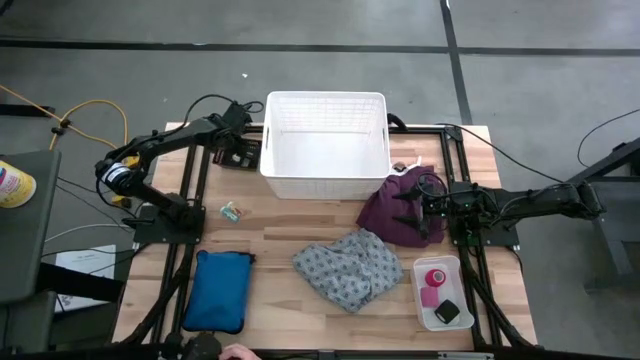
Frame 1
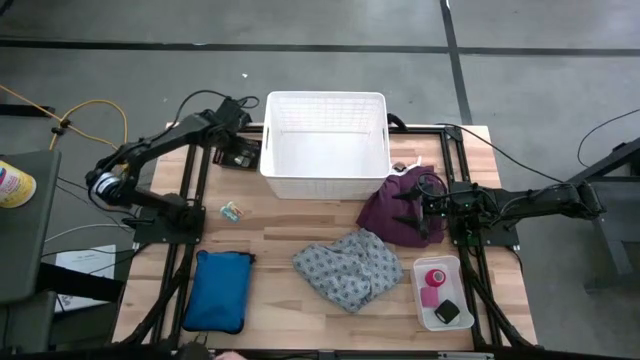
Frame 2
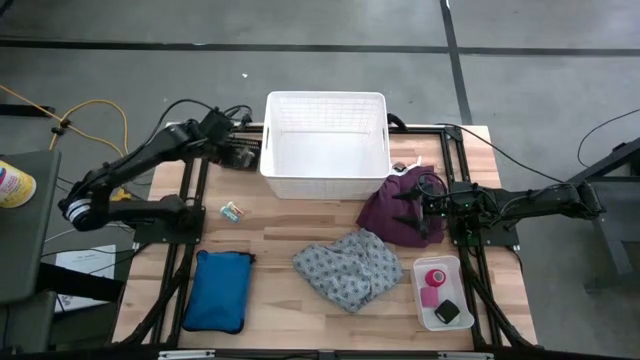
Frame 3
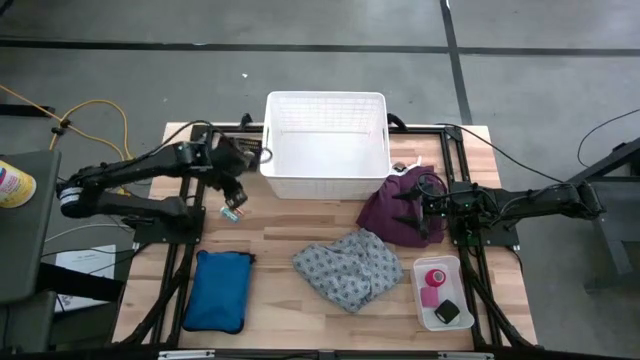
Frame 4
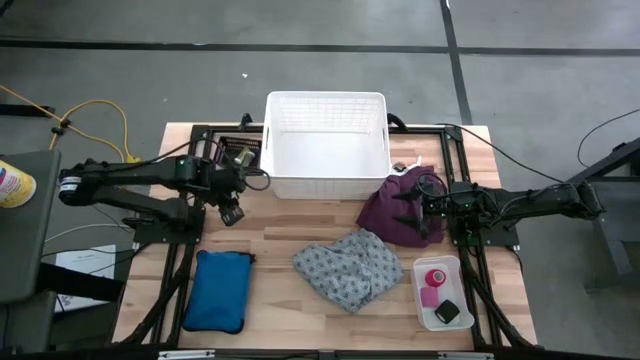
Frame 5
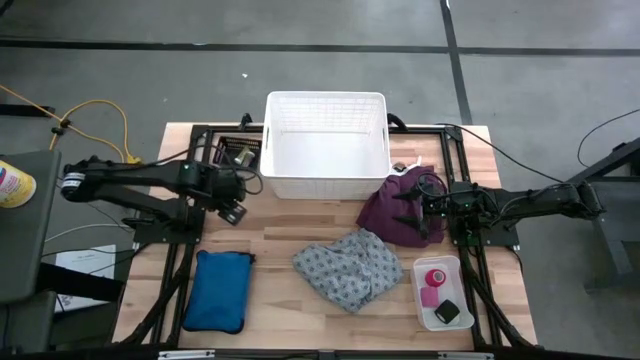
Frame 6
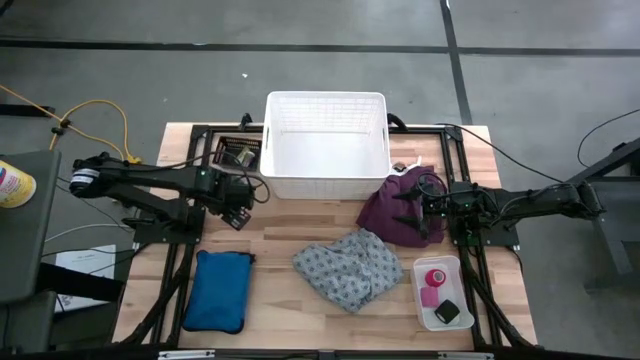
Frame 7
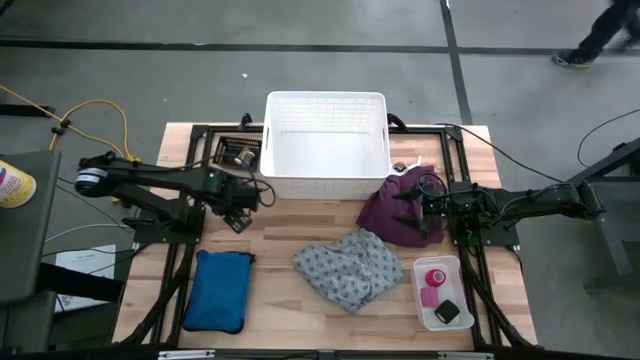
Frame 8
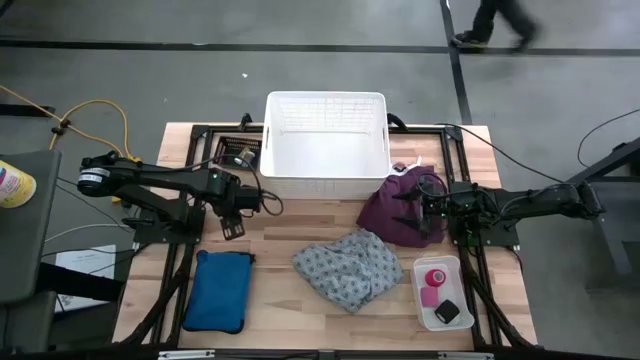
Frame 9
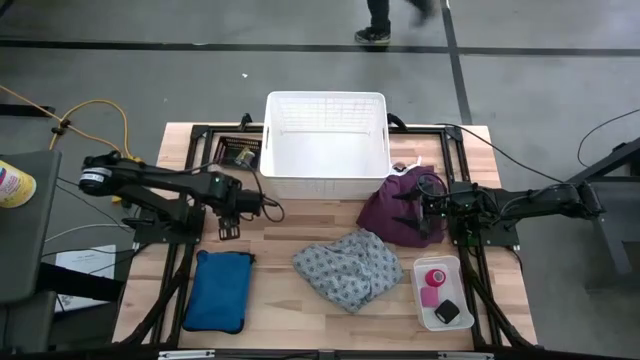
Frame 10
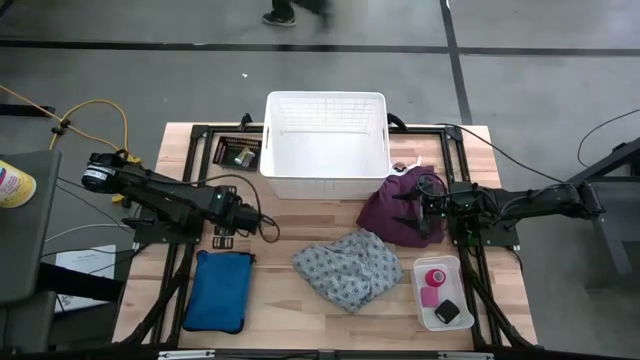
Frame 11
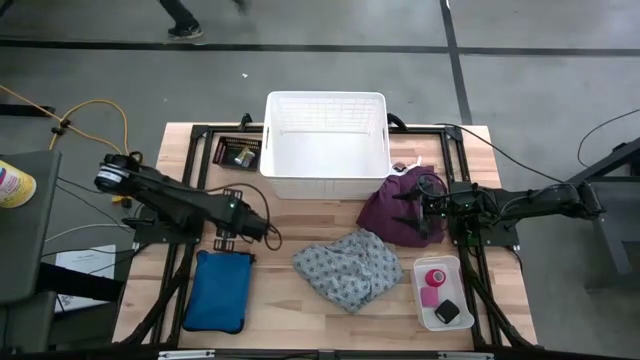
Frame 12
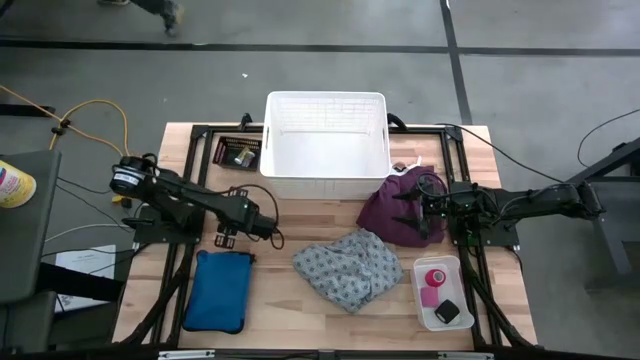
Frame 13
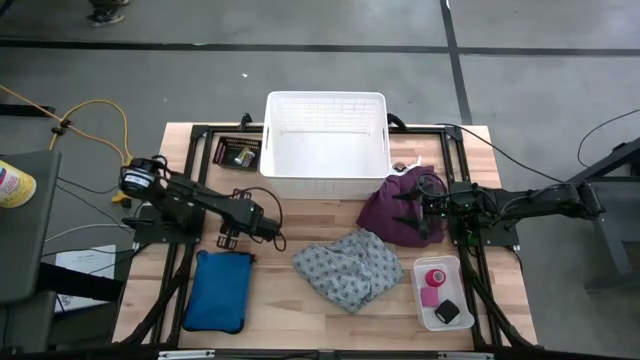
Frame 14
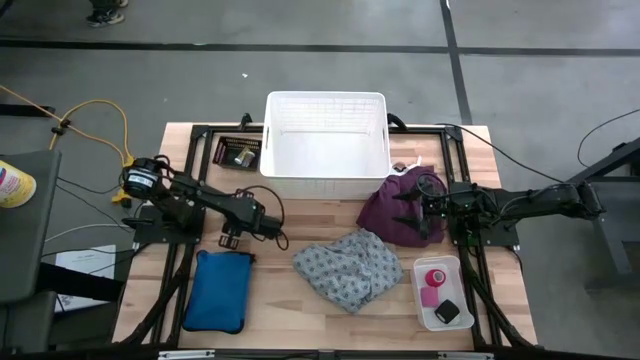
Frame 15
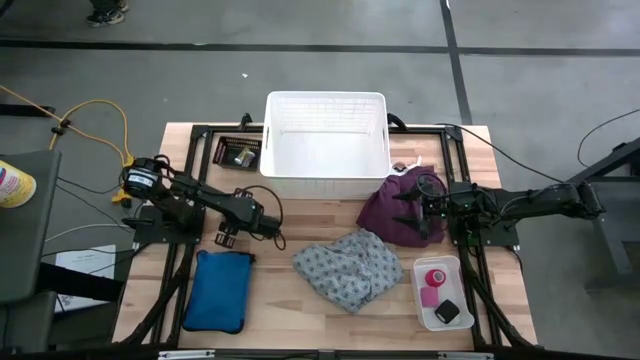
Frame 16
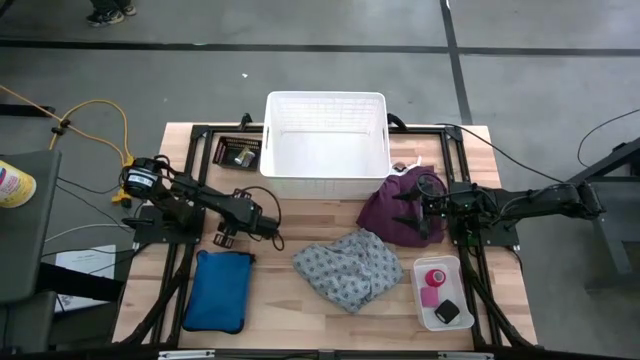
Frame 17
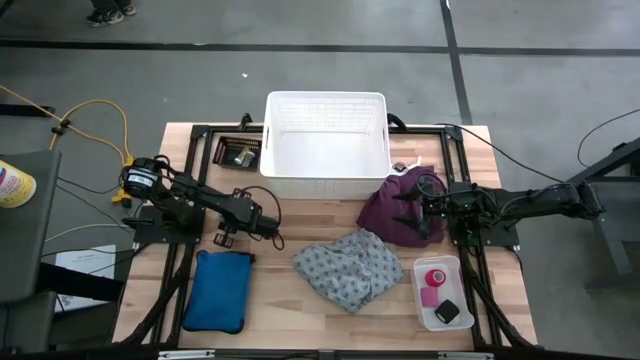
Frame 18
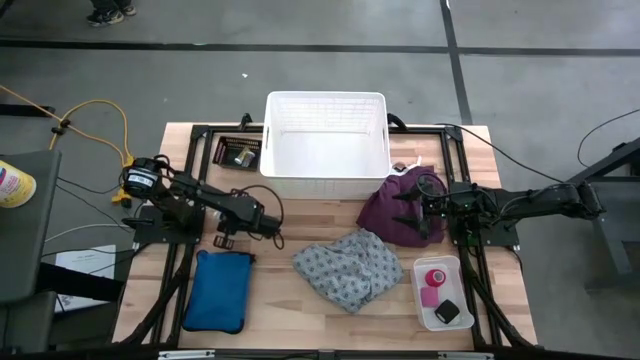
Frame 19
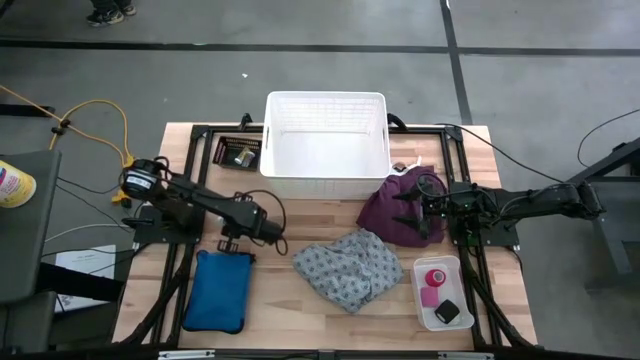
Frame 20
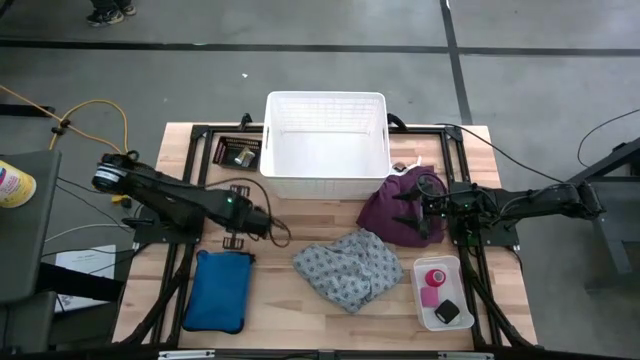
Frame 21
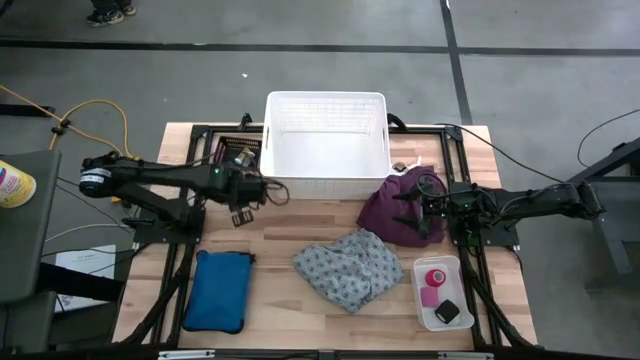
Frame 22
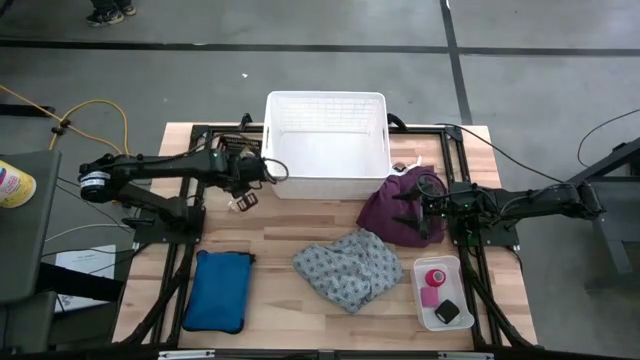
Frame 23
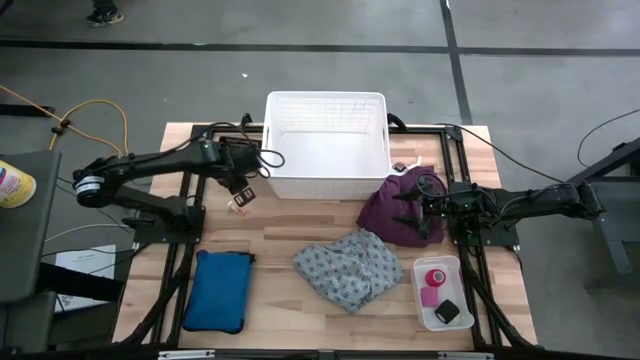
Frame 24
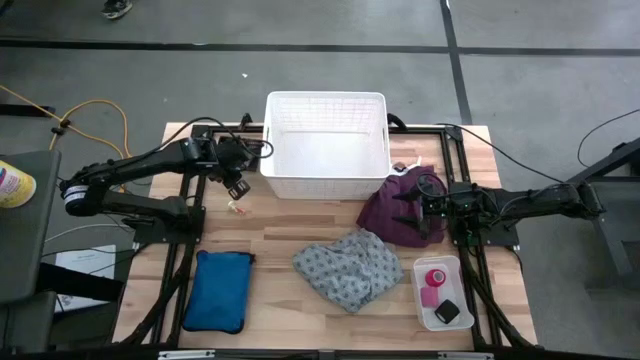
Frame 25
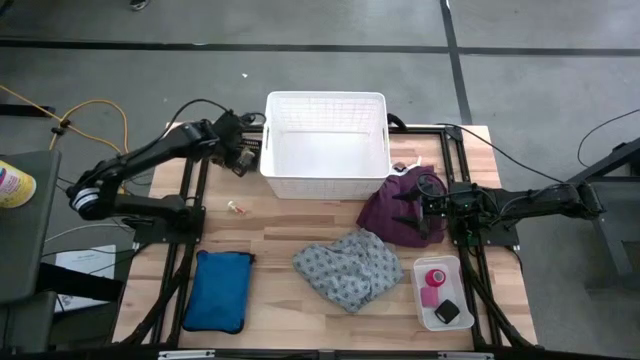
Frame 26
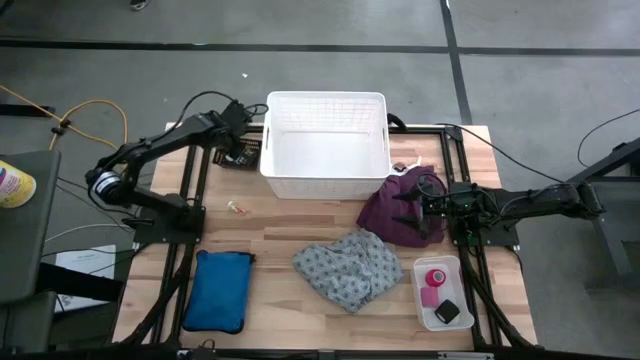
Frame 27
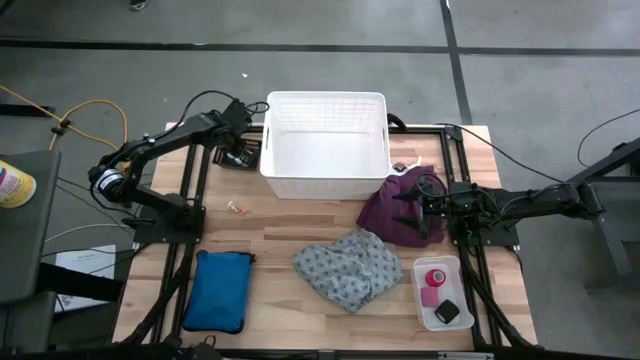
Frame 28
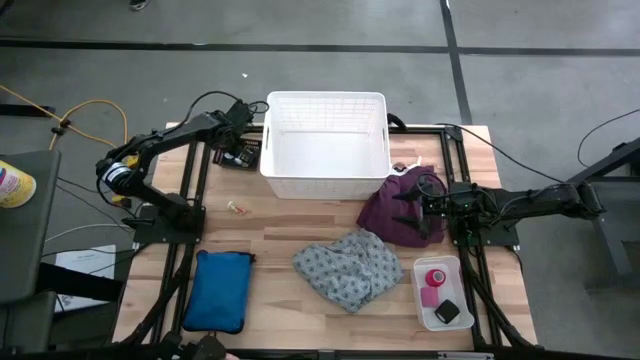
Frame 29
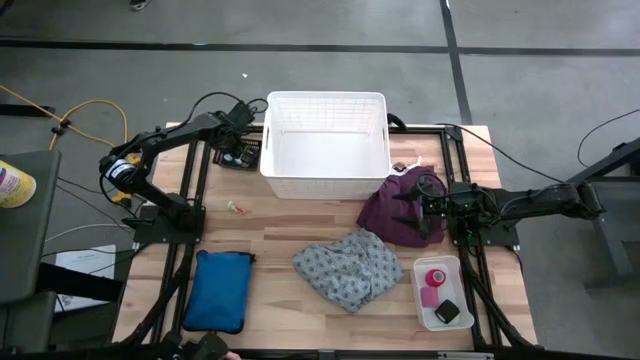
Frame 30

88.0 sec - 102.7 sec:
Task: Pick & place medical supplies in basket/bin
Put the light green pill bottle into the black bin
